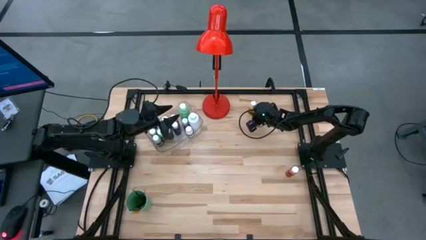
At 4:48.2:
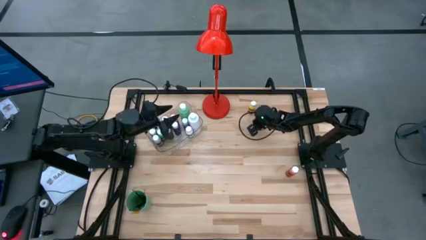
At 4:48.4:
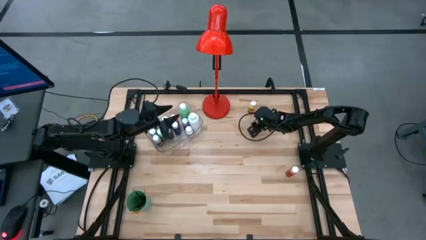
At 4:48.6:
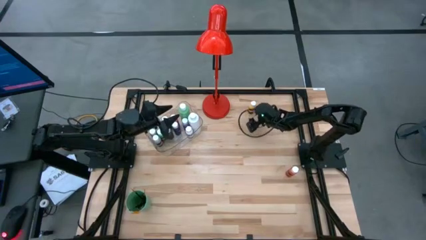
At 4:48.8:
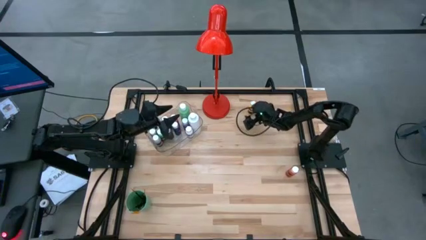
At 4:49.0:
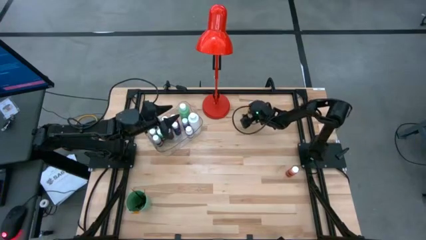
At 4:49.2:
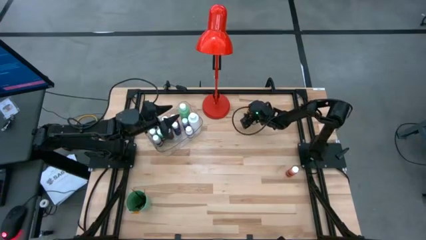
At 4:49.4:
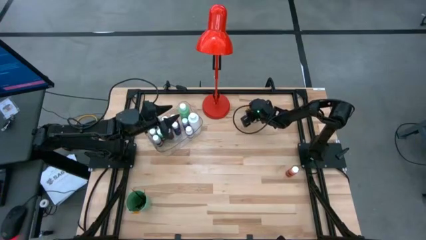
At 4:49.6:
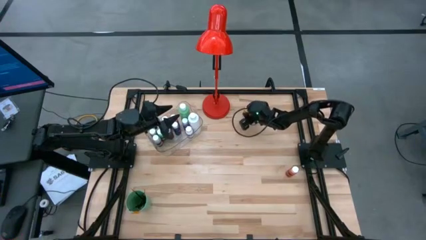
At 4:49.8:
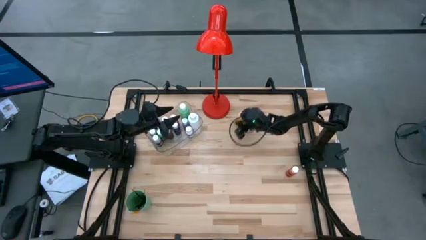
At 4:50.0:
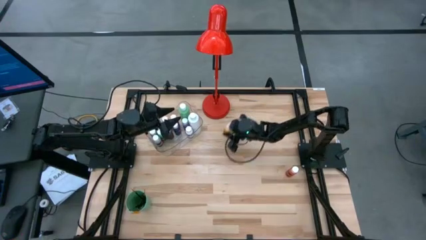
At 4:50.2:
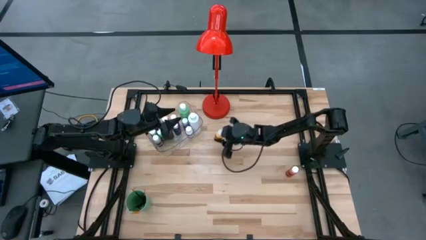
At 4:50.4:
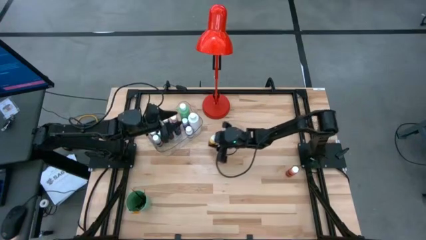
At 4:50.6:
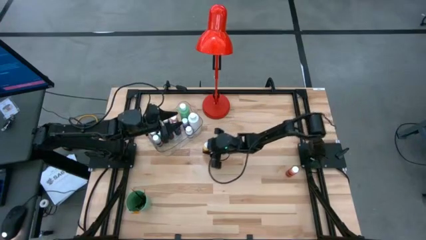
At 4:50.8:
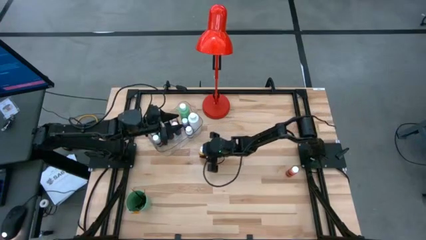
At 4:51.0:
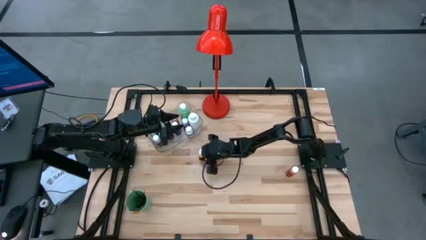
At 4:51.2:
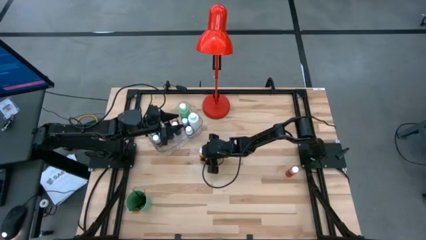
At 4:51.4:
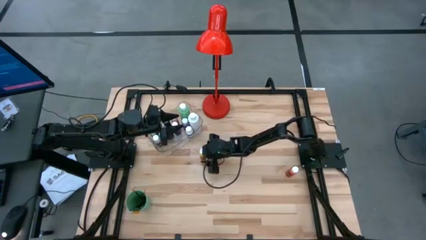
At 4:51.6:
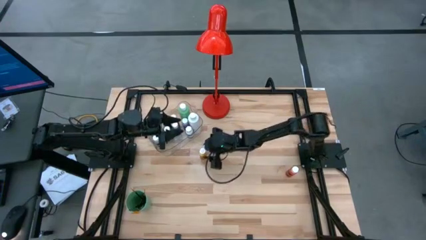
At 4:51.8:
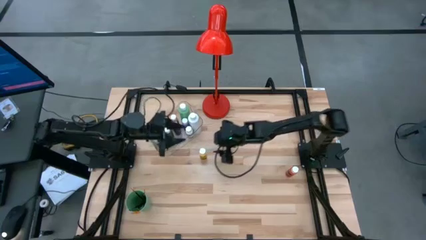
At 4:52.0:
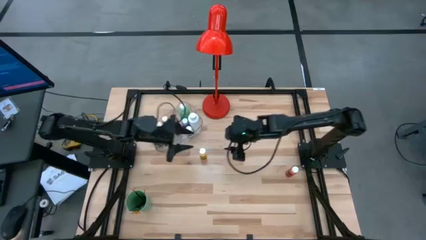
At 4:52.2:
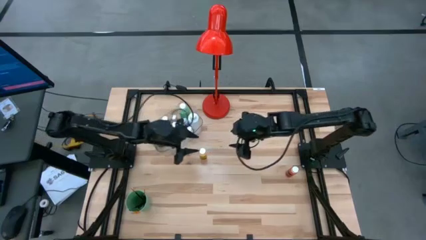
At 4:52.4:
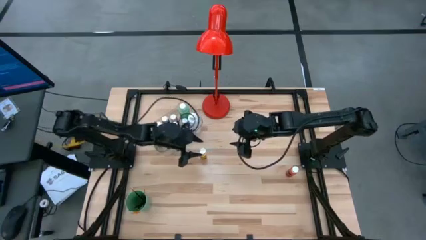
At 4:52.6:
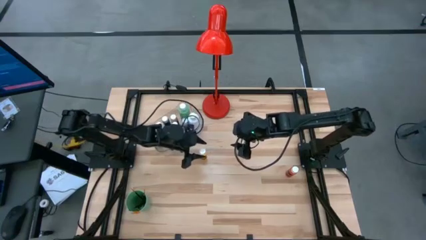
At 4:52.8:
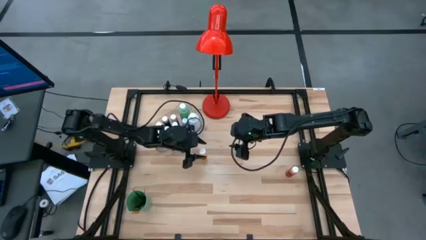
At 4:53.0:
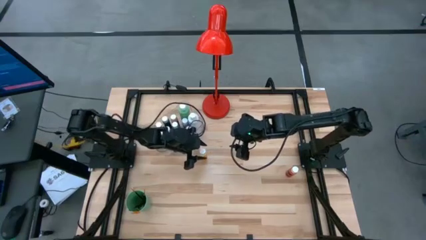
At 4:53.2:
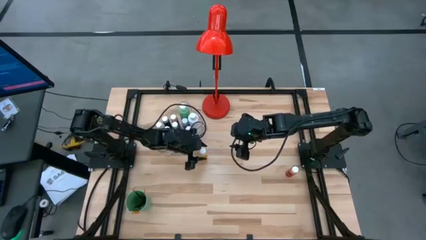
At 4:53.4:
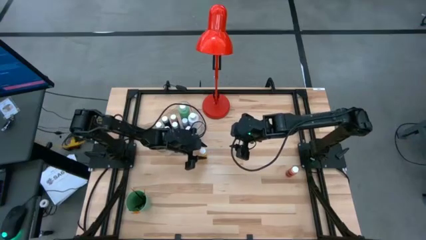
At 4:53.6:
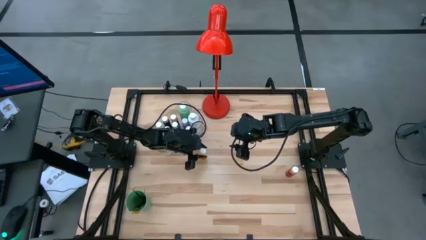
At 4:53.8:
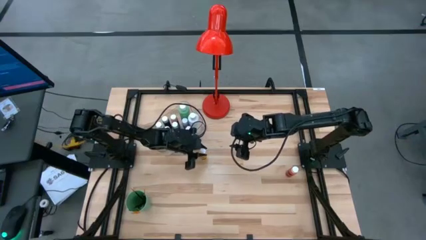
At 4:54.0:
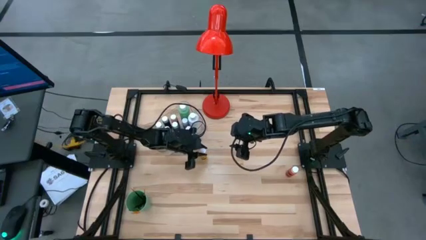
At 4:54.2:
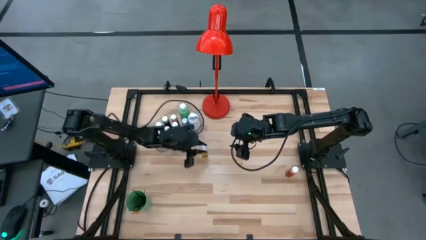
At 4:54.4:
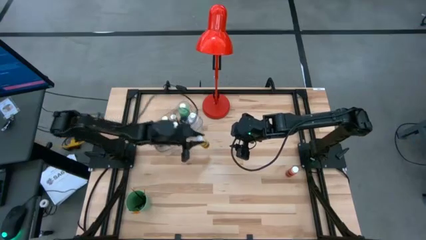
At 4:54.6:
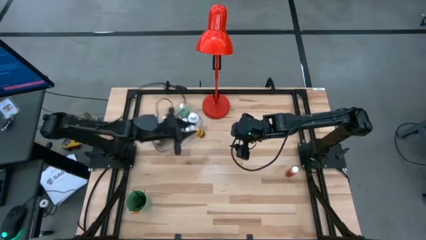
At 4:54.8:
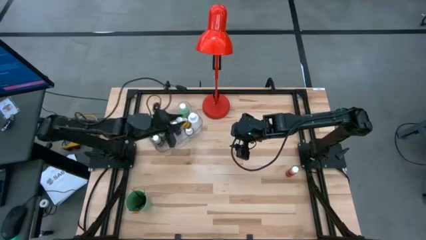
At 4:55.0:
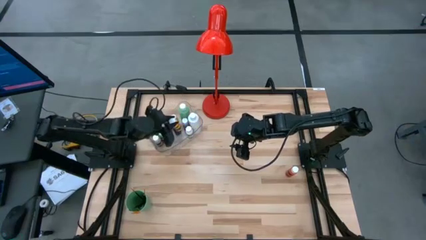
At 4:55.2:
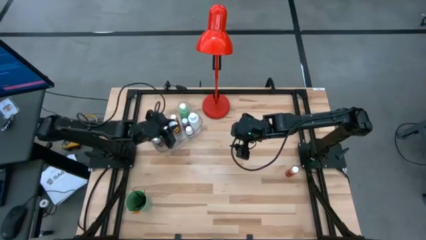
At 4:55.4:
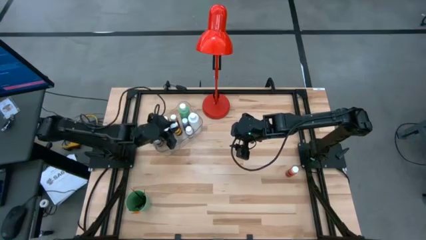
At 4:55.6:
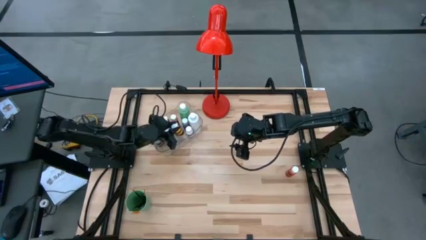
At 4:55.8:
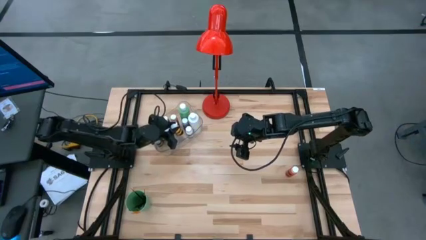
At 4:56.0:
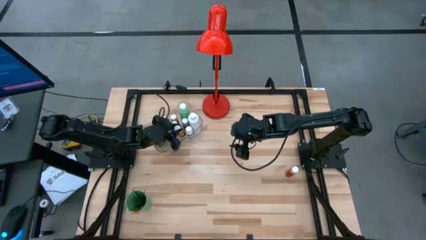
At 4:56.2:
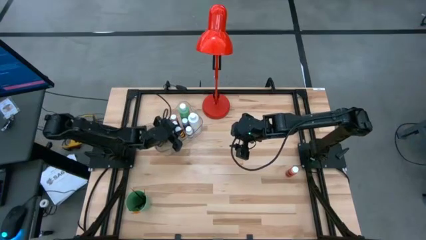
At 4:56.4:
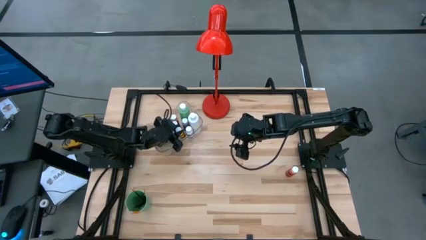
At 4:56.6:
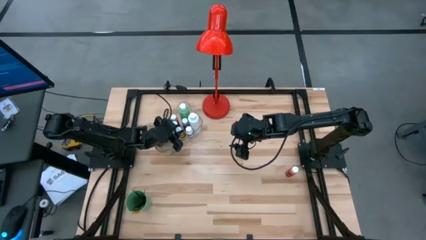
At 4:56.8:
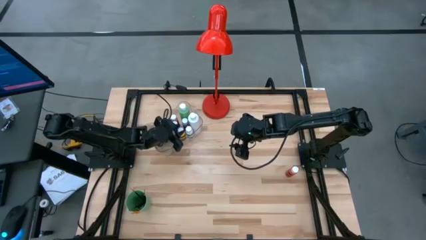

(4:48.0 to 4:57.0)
Task: Pick & Place Paint Supplies
Put the yellow paint bottle into the transparent bin

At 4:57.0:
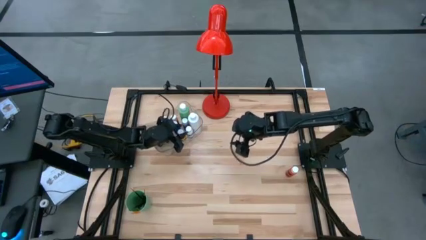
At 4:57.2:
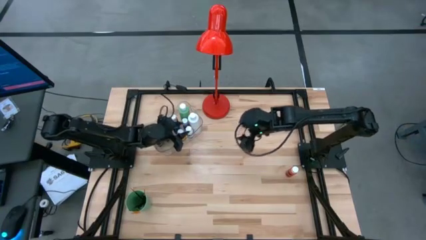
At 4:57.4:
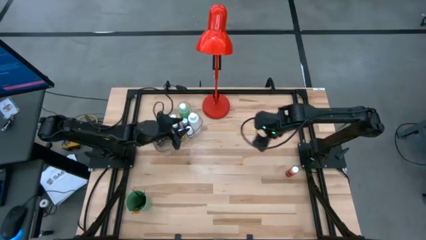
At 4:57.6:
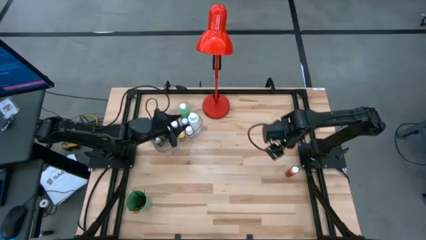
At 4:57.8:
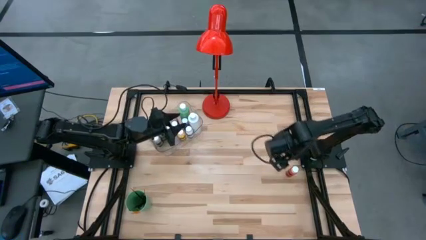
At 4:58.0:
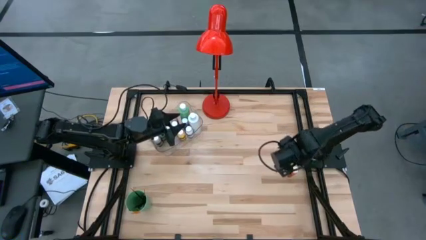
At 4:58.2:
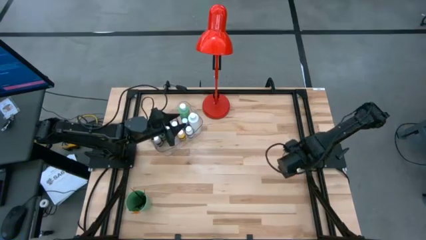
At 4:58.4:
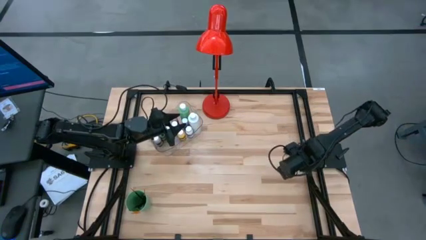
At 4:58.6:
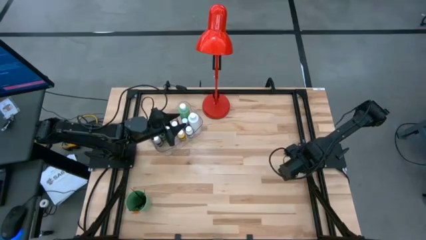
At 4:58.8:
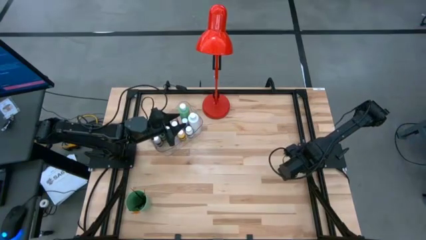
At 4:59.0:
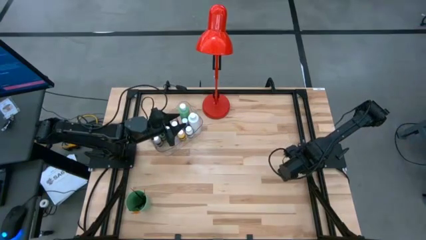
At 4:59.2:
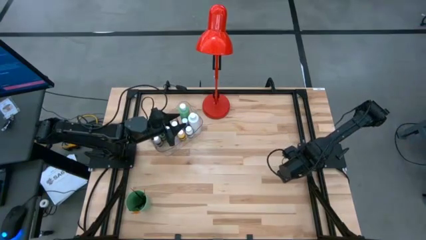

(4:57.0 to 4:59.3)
Put the orange paint bottle into the transparent bin
